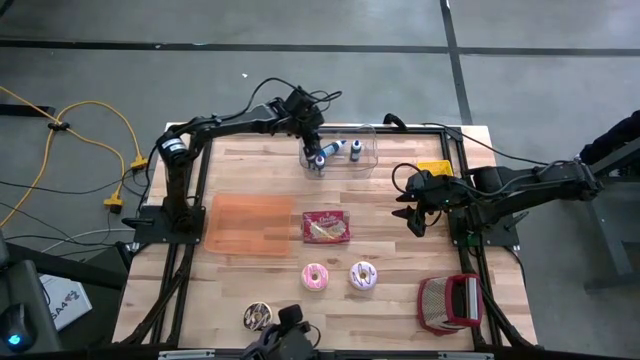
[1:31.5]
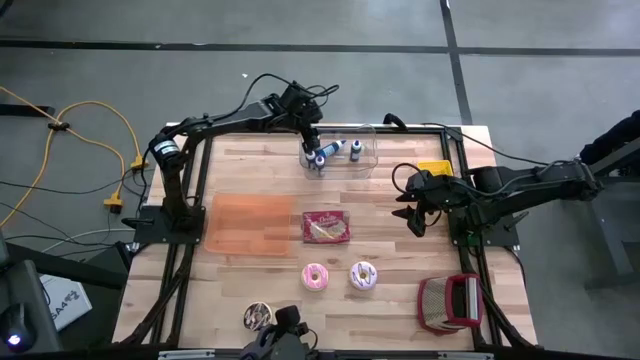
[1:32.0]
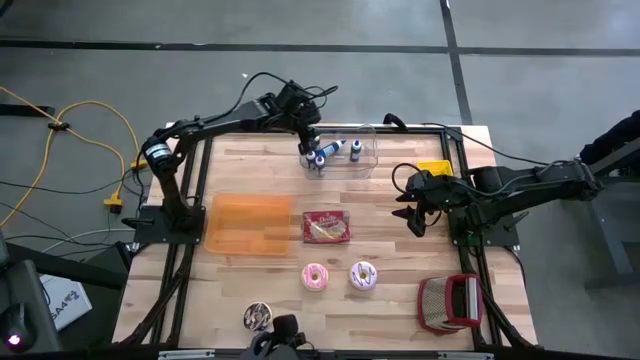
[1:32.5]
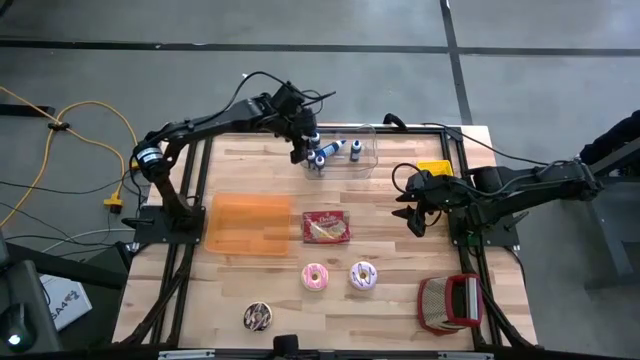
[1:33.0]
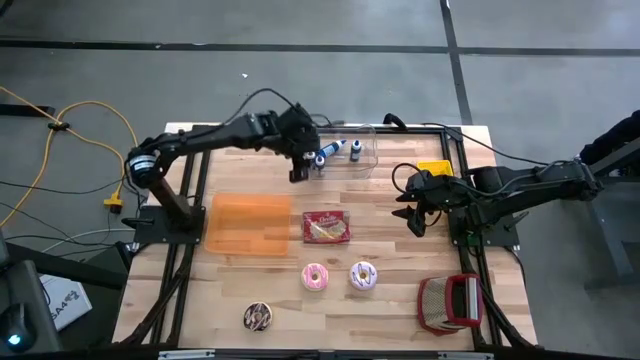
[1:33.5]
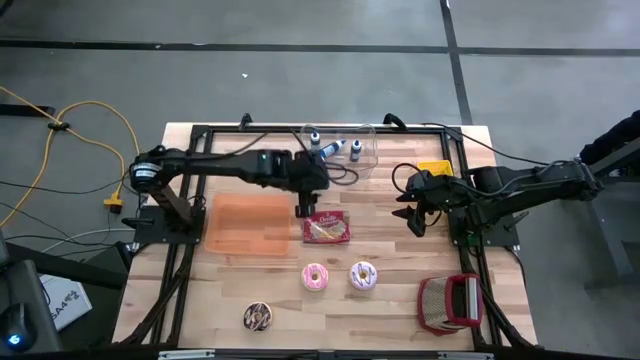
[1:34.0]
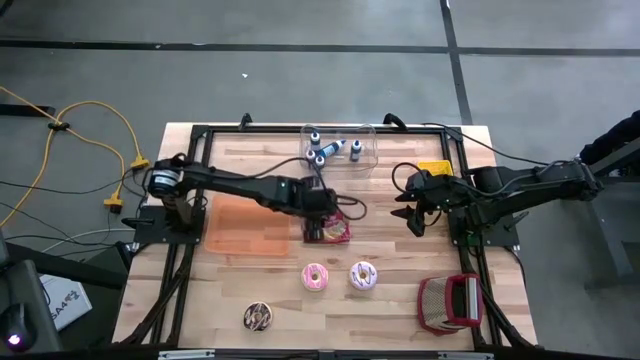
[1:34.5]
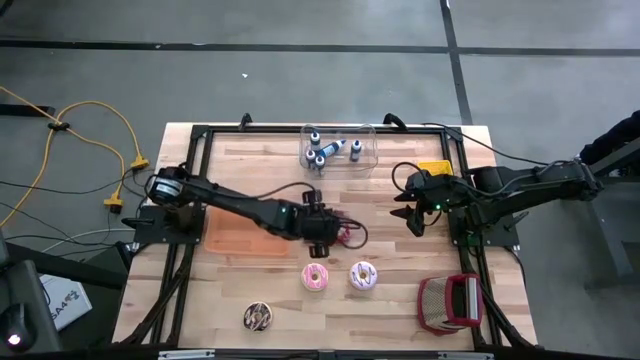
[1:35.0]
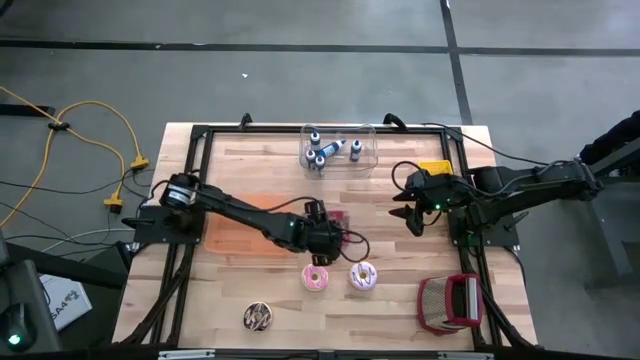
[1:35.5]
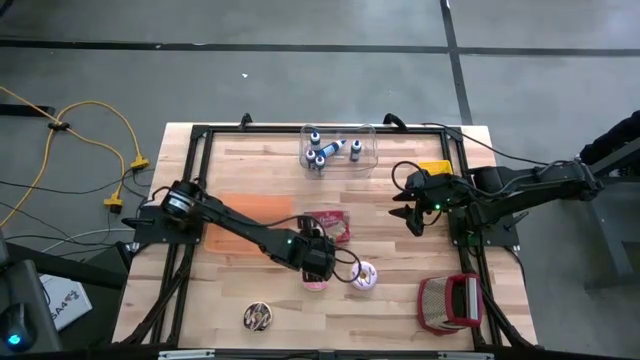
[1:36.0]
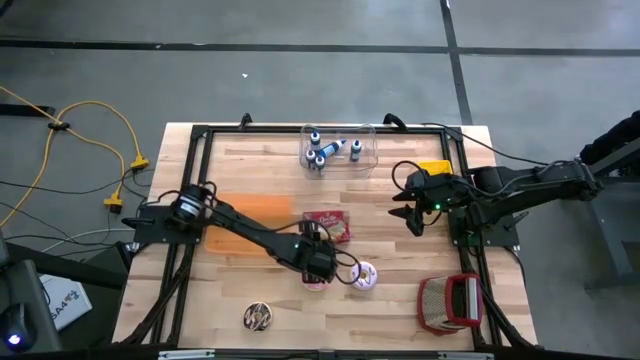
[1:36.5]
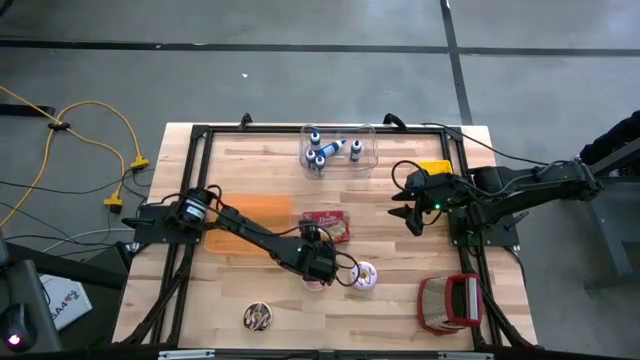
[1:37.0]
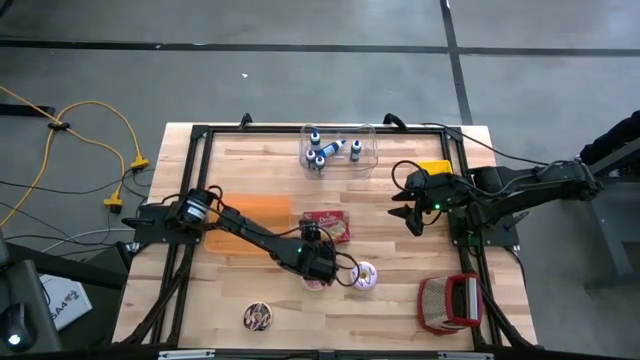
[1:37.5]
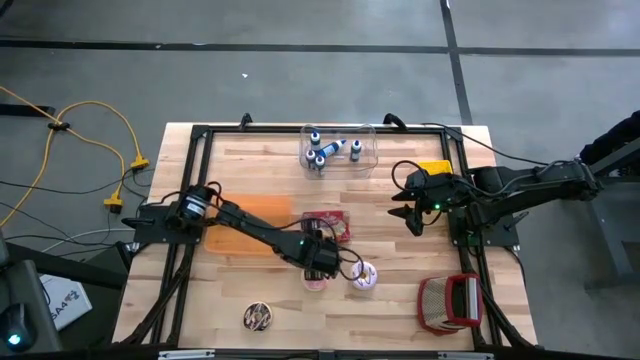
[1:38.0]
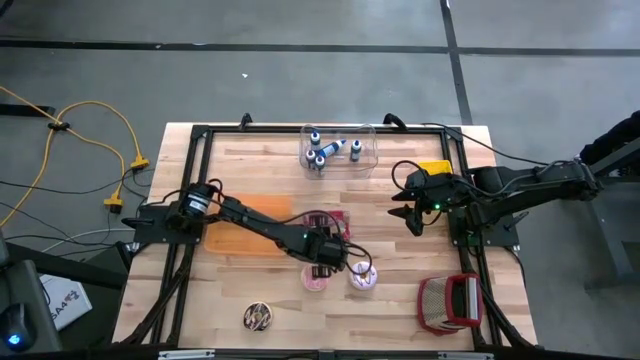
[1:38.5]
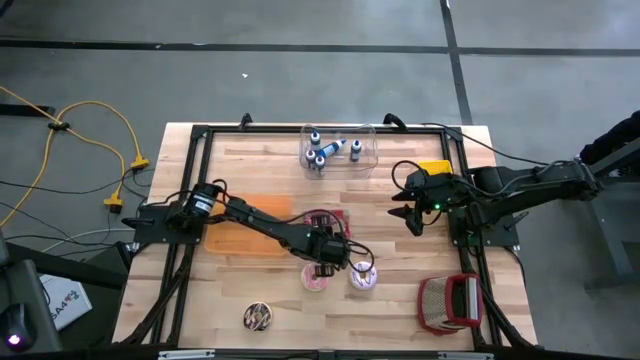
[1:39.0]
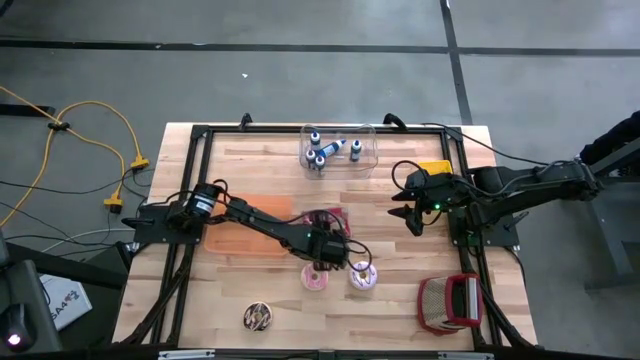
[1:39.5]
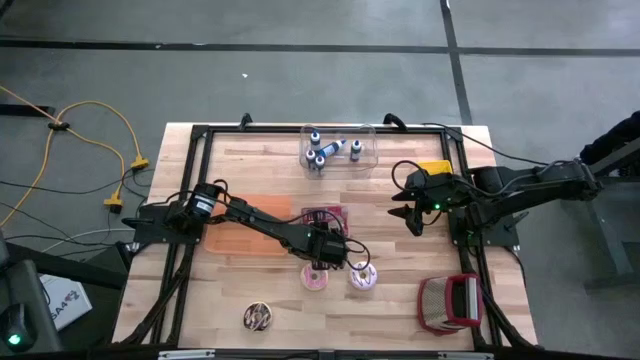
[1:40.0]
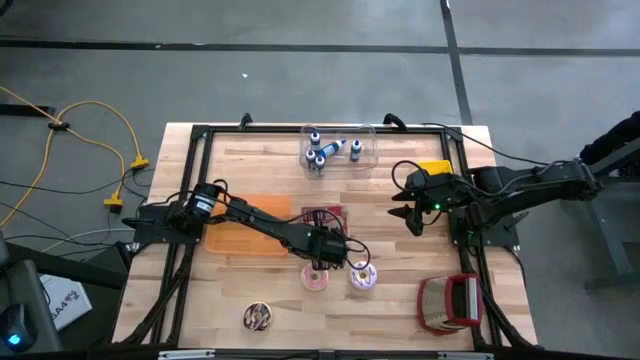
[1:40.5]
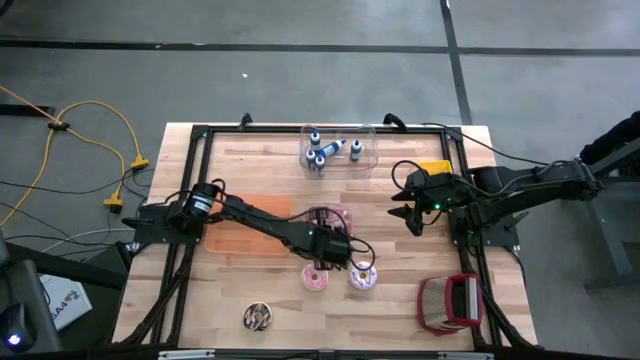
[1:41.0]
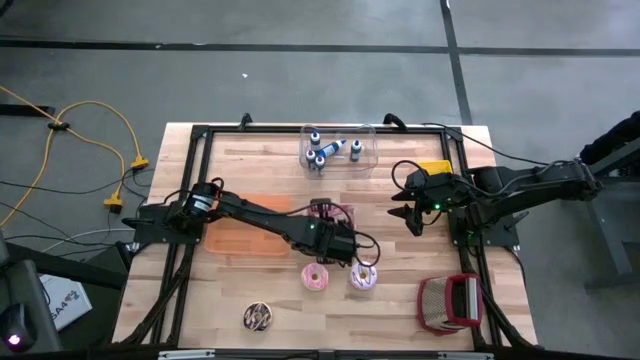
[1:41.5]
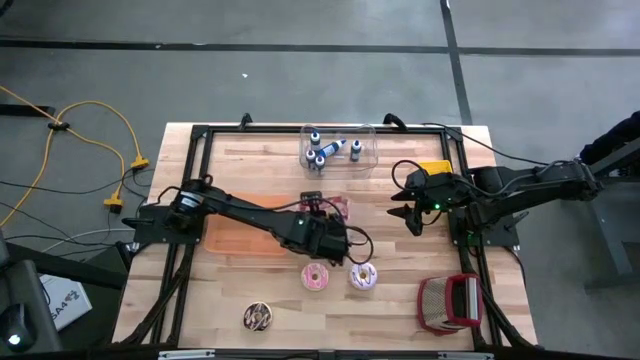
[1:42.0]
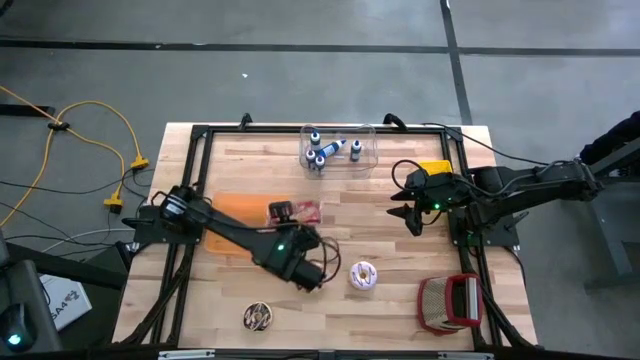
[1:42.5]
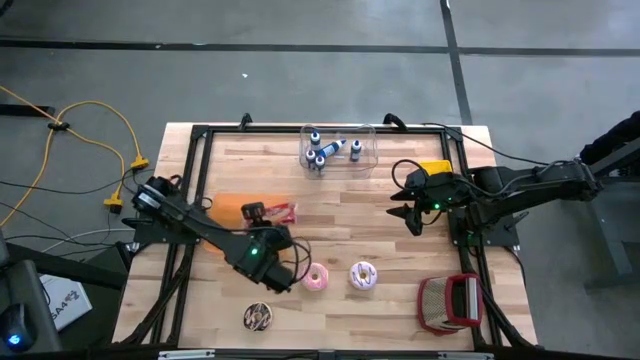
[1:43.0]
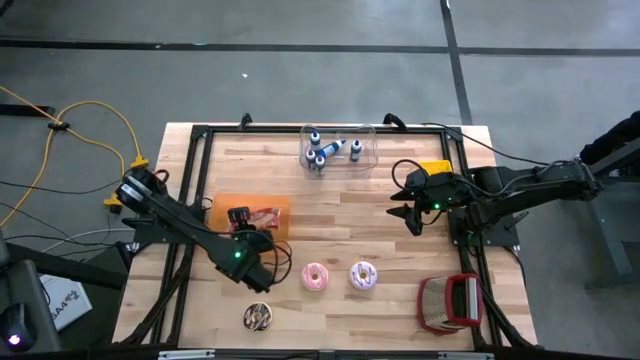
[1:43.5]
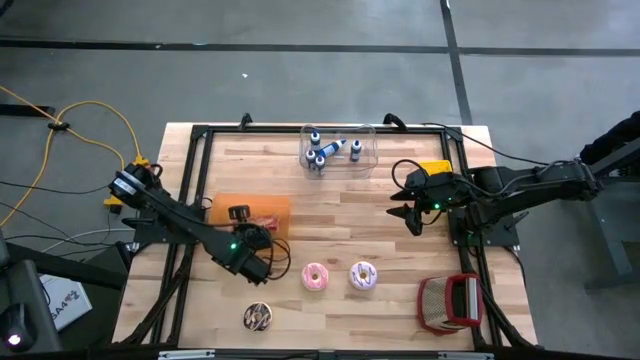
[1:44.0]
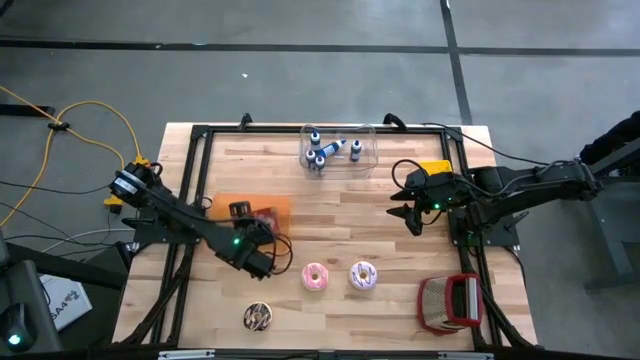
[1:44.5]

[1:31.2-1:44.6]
Put the red popcorn bag into the orange bin

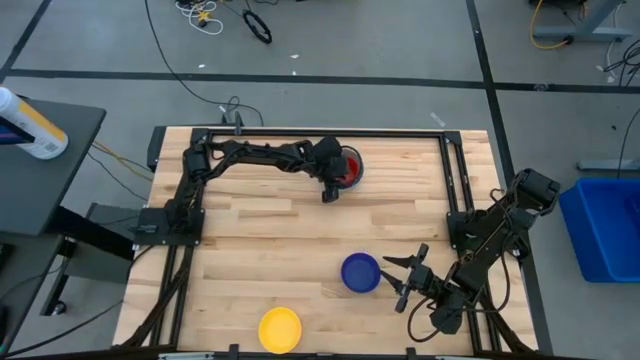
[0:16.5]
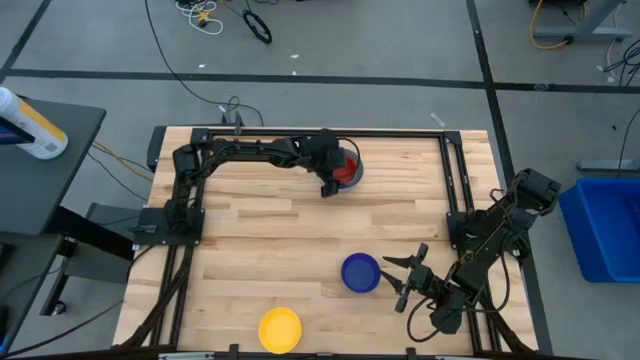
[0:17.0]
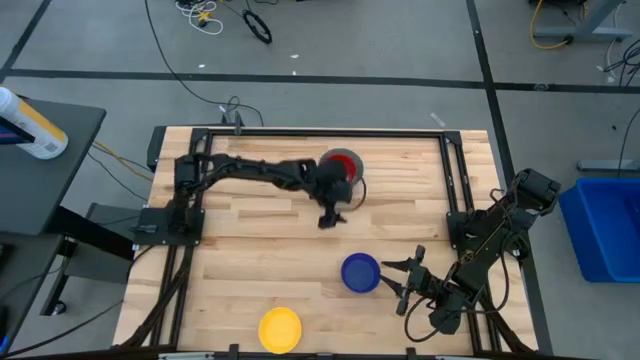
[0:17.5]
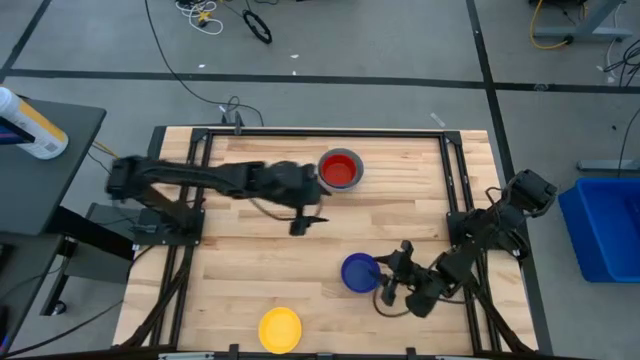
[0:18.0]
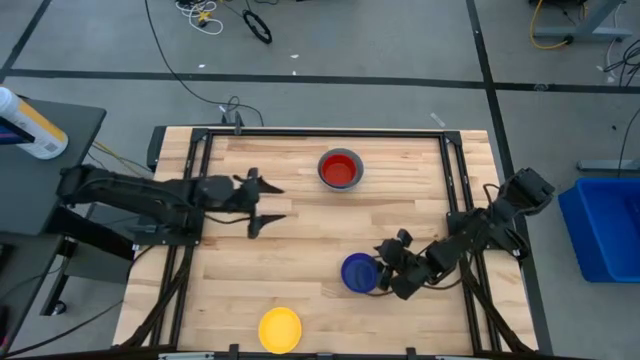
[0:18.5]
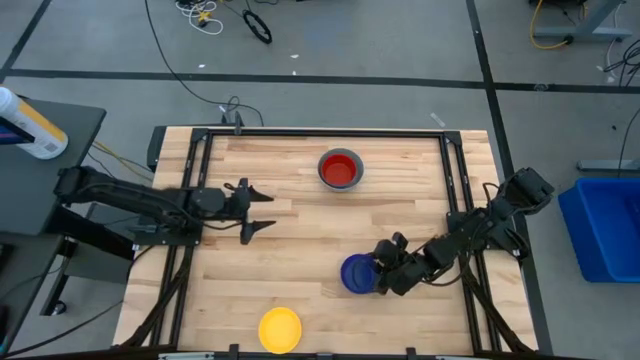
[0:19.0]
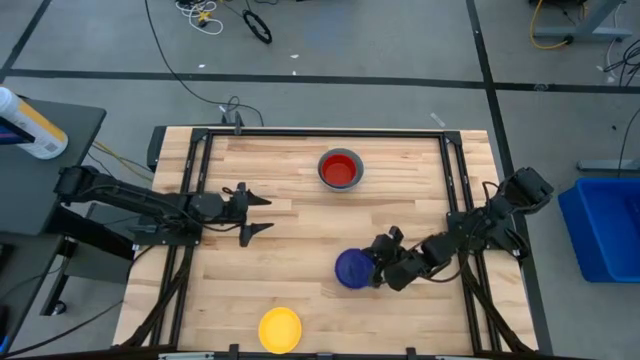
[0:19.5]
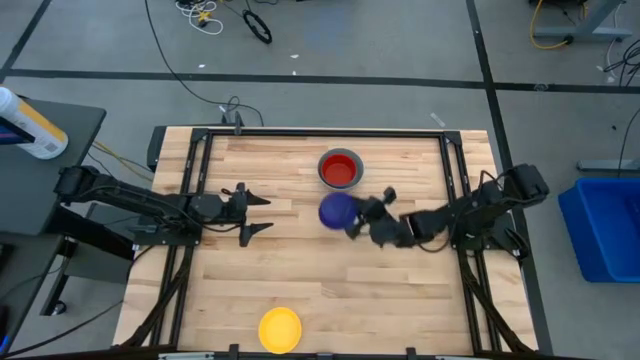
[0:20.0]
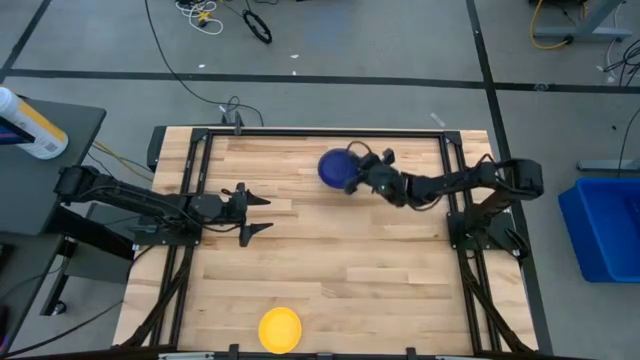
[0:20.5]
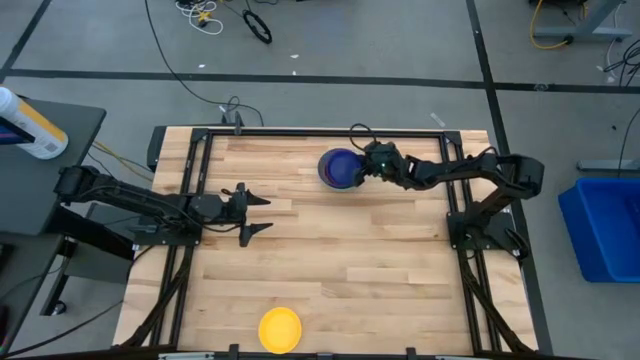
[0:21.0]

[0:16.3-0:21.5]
Stack the dark blue bowl in the red bowl

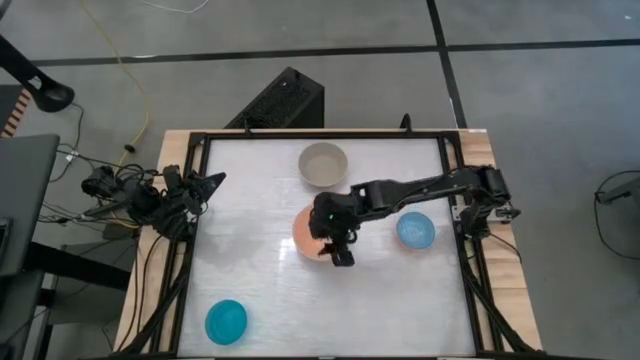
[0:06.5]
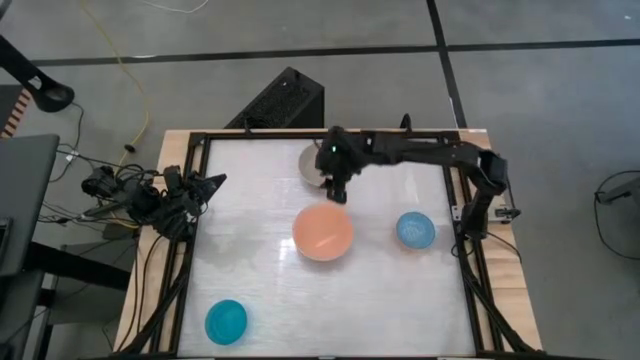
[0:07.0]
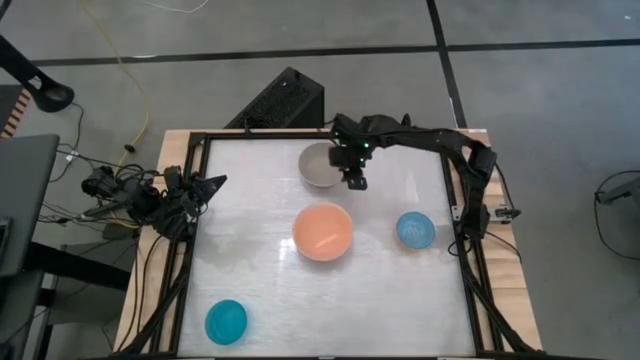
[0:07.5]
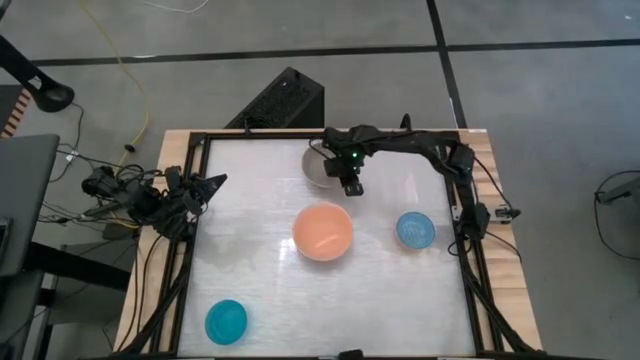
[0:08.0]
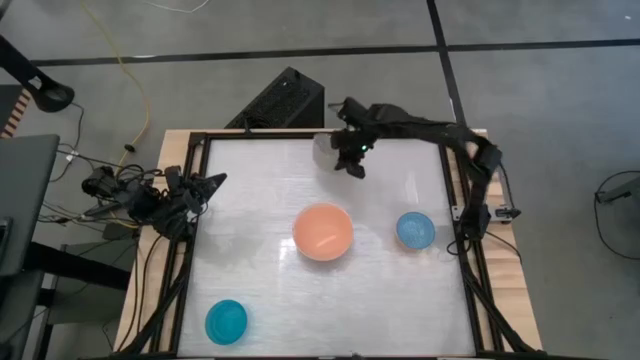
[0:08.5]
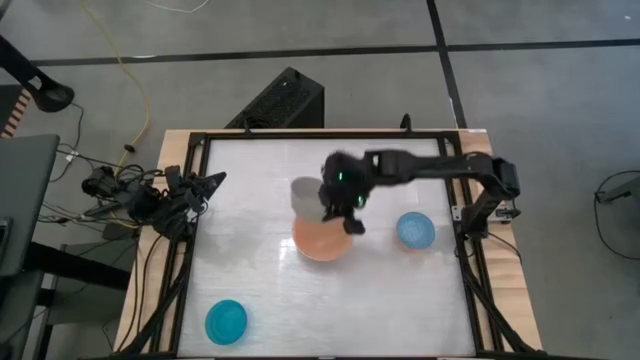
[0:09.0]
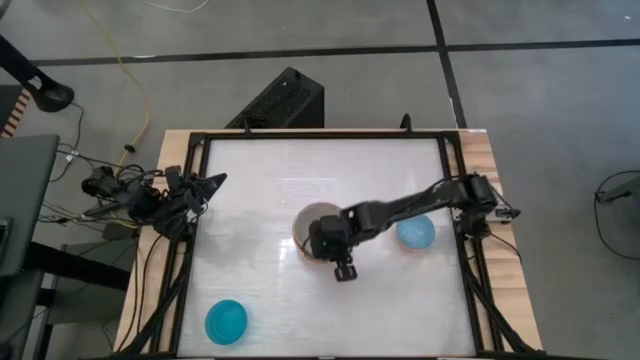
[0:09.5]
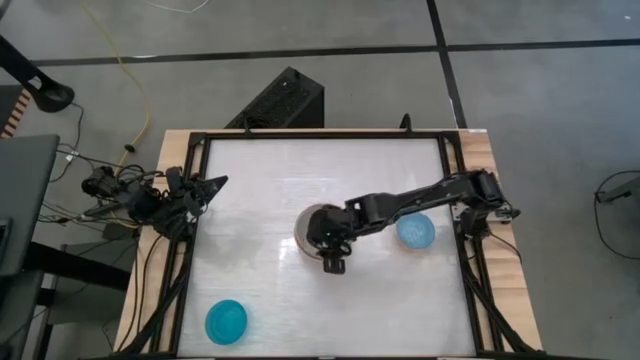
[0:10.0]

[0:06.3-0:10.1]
Stack the gray bowl on top of the light orange bowl
